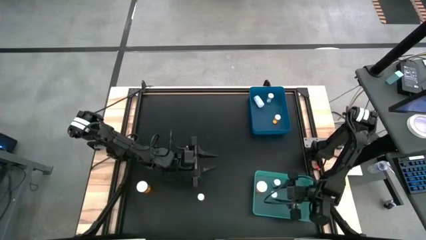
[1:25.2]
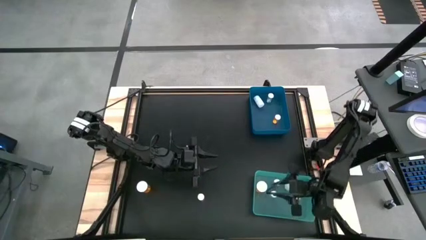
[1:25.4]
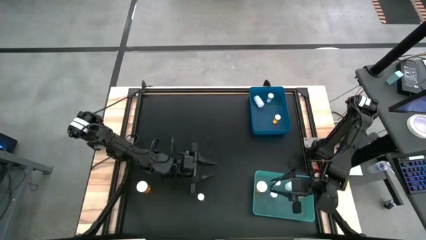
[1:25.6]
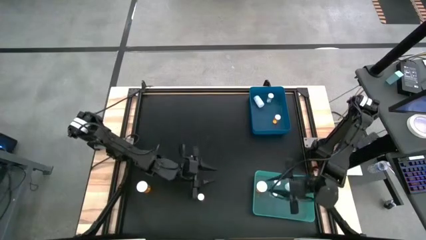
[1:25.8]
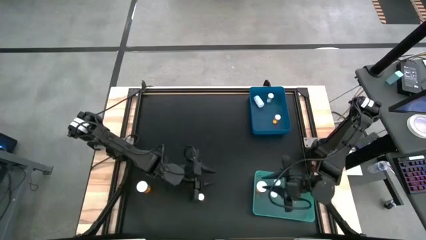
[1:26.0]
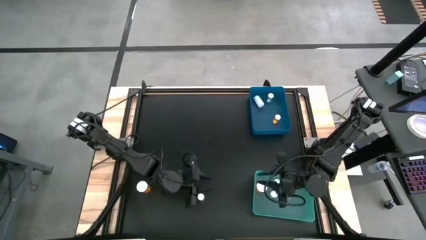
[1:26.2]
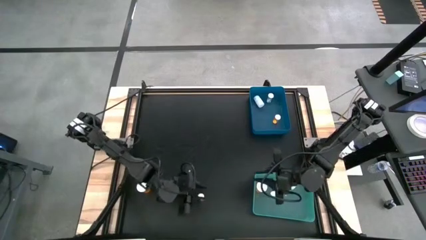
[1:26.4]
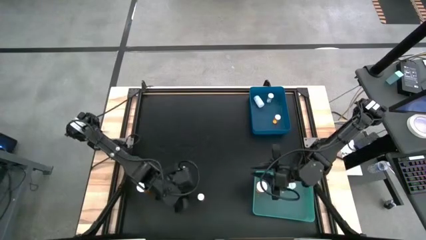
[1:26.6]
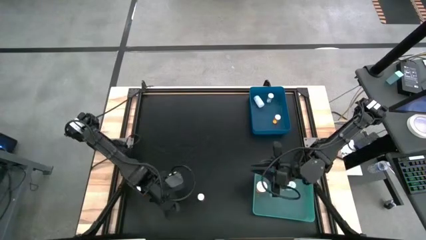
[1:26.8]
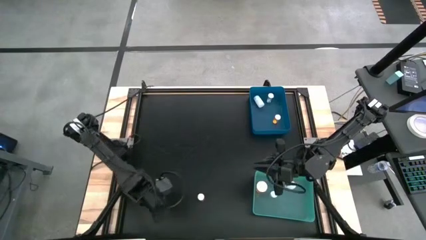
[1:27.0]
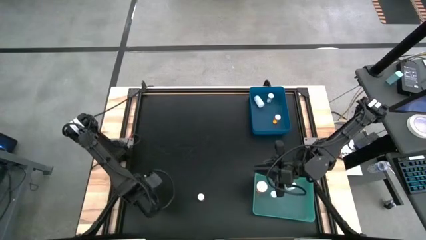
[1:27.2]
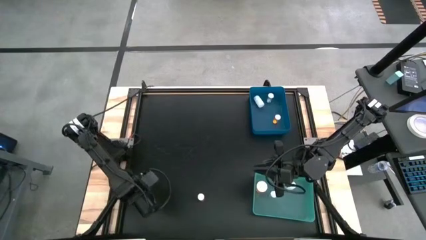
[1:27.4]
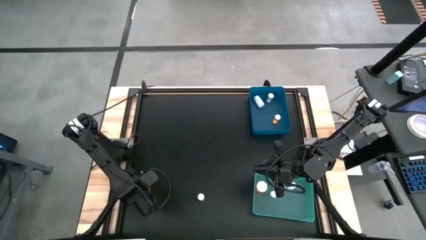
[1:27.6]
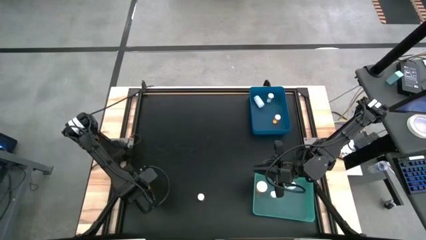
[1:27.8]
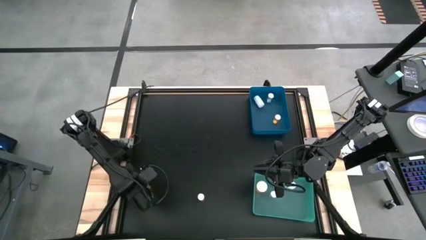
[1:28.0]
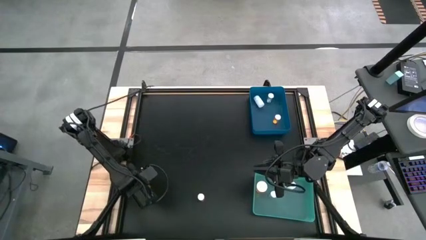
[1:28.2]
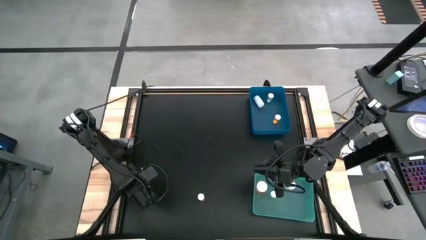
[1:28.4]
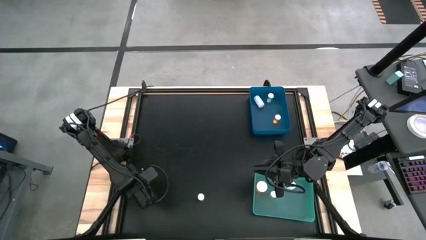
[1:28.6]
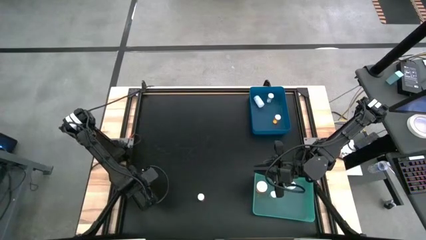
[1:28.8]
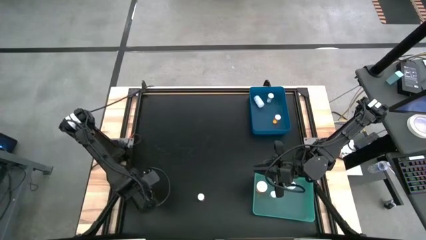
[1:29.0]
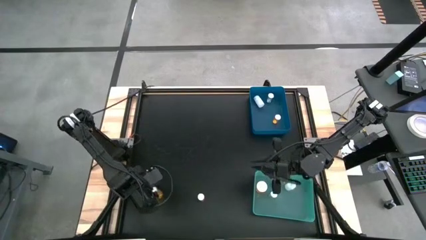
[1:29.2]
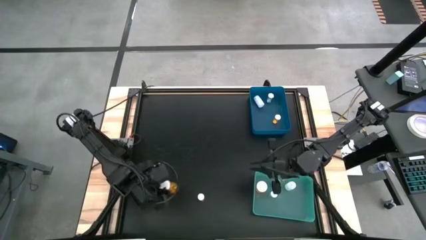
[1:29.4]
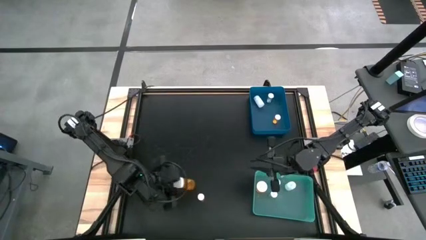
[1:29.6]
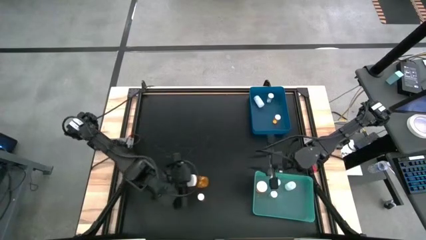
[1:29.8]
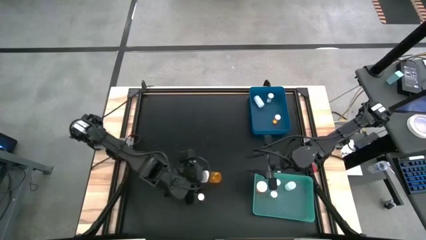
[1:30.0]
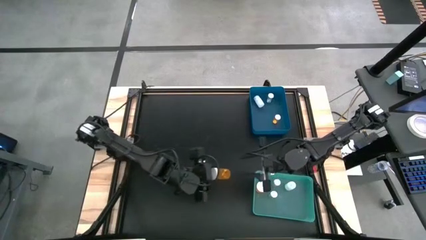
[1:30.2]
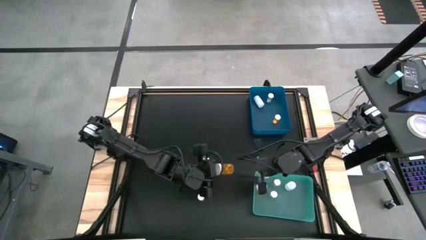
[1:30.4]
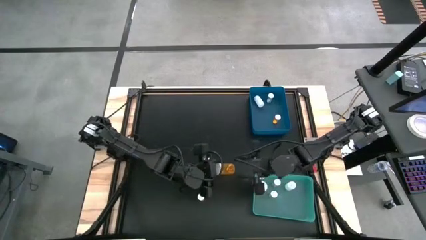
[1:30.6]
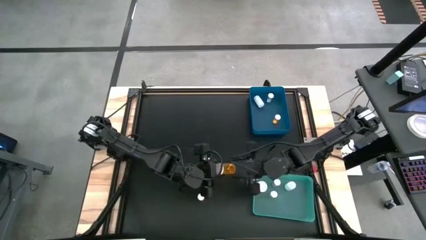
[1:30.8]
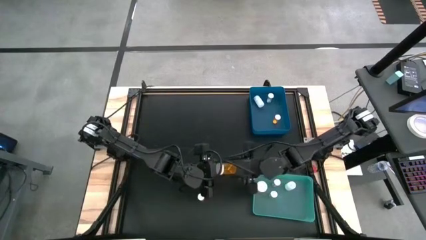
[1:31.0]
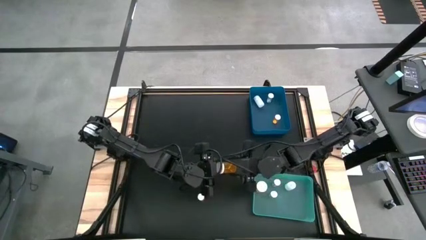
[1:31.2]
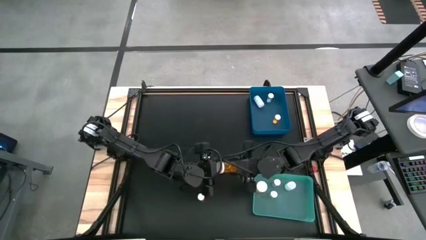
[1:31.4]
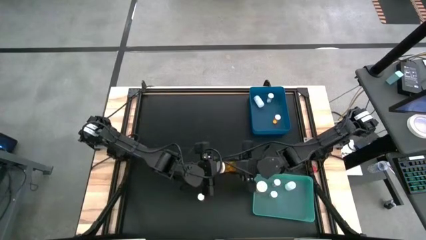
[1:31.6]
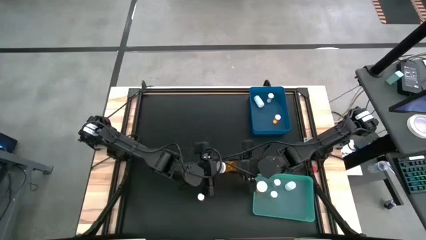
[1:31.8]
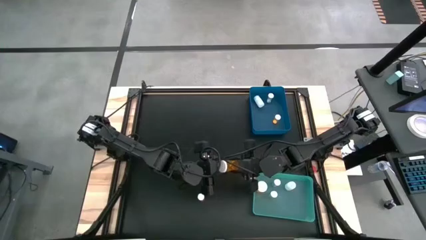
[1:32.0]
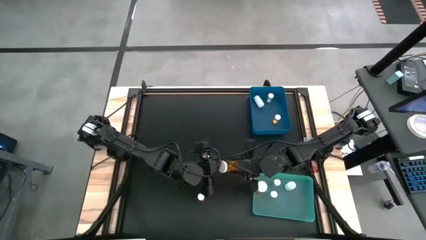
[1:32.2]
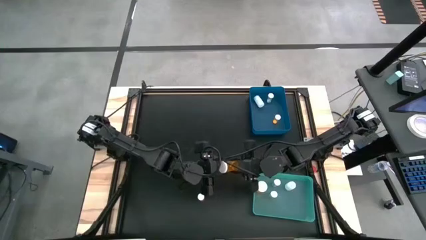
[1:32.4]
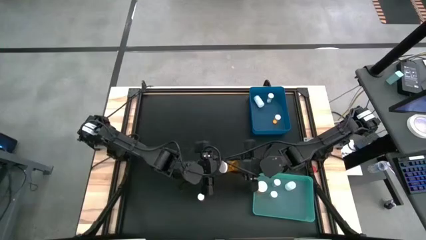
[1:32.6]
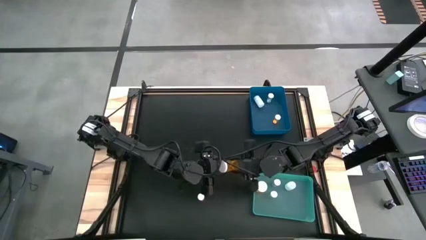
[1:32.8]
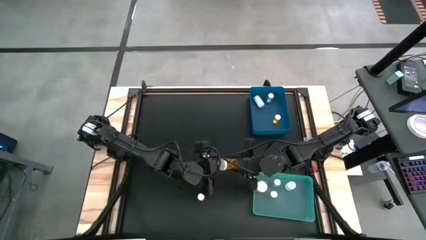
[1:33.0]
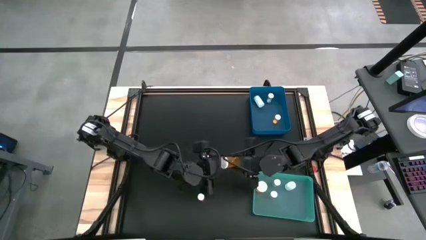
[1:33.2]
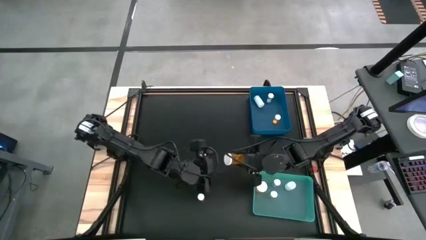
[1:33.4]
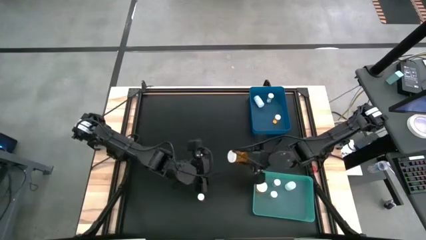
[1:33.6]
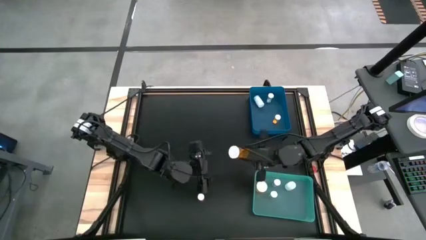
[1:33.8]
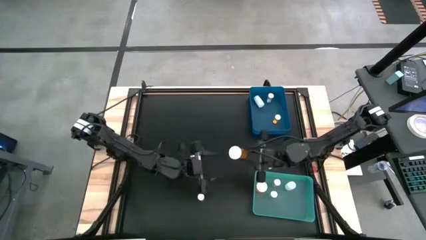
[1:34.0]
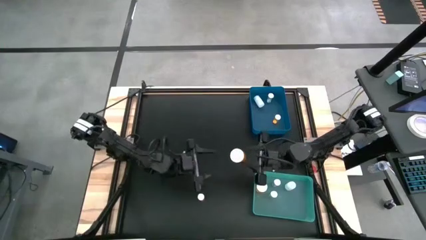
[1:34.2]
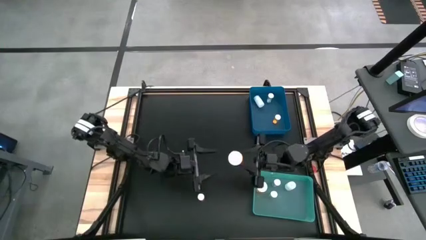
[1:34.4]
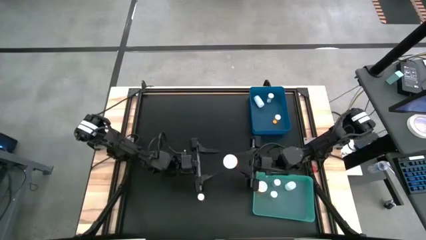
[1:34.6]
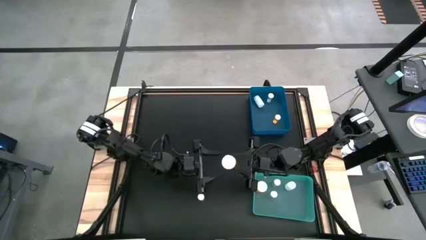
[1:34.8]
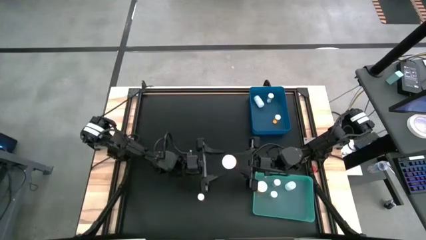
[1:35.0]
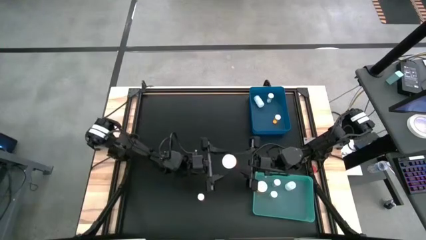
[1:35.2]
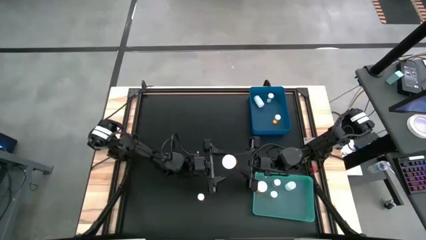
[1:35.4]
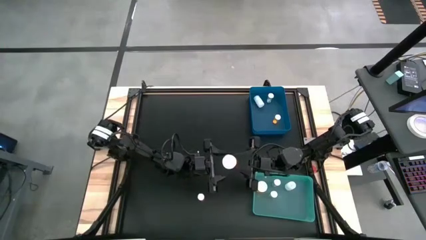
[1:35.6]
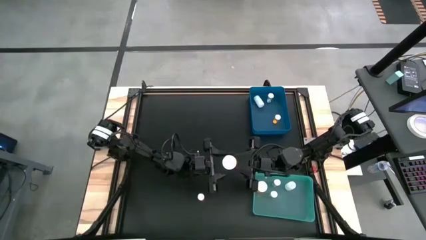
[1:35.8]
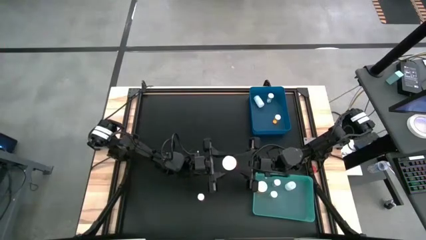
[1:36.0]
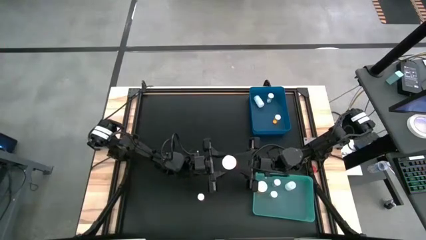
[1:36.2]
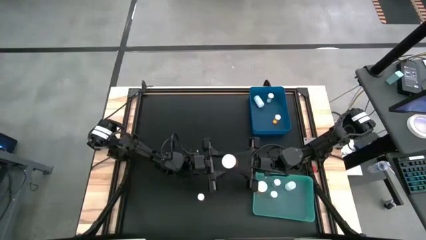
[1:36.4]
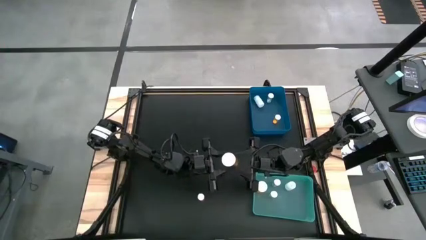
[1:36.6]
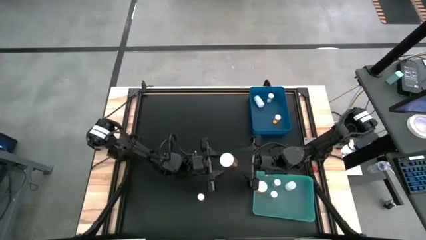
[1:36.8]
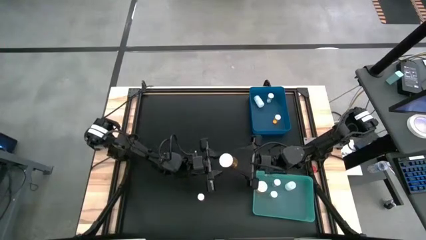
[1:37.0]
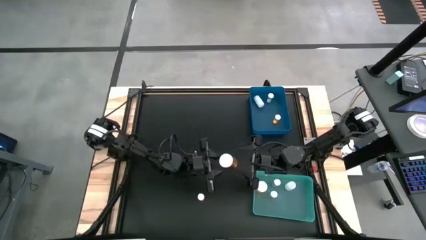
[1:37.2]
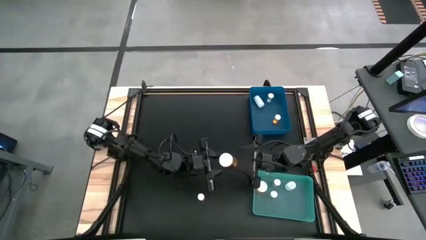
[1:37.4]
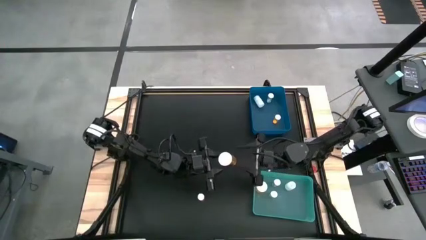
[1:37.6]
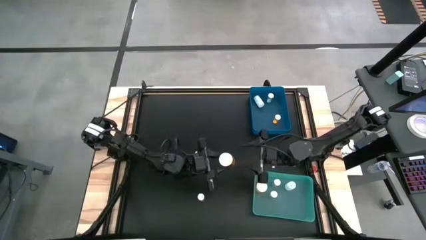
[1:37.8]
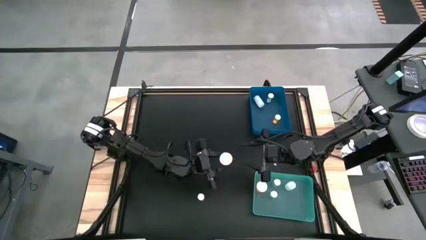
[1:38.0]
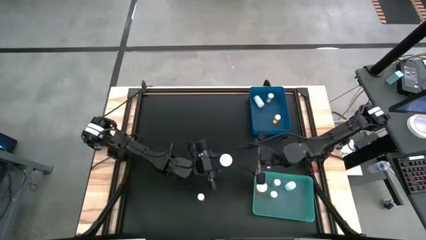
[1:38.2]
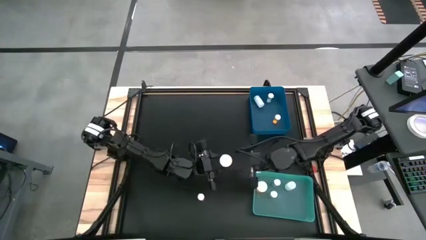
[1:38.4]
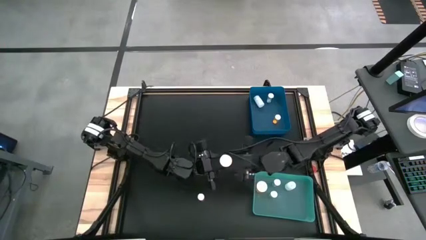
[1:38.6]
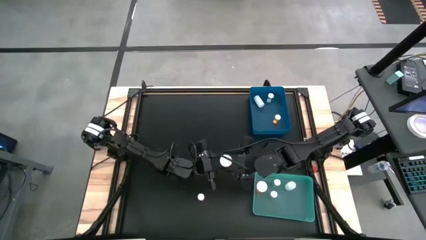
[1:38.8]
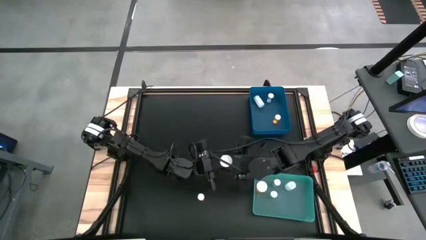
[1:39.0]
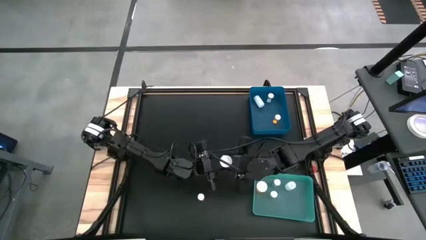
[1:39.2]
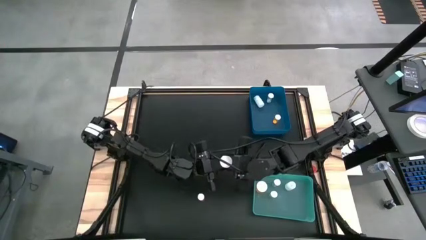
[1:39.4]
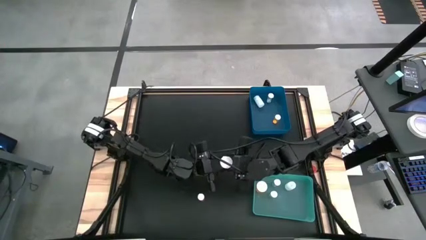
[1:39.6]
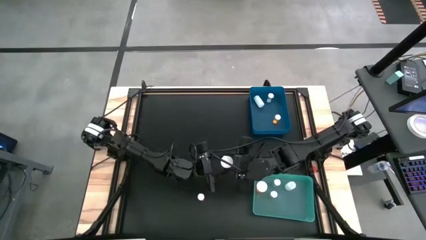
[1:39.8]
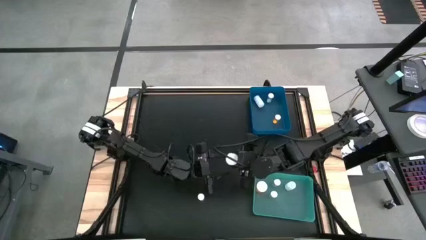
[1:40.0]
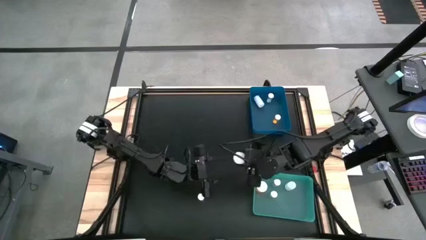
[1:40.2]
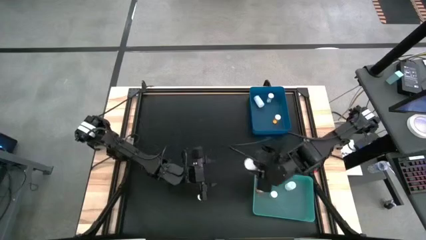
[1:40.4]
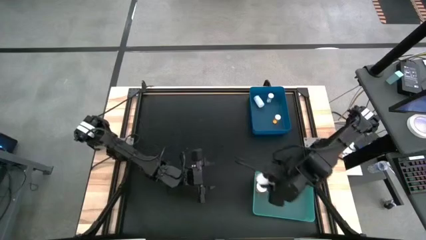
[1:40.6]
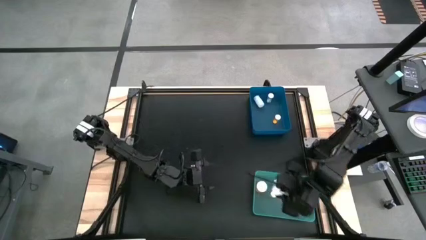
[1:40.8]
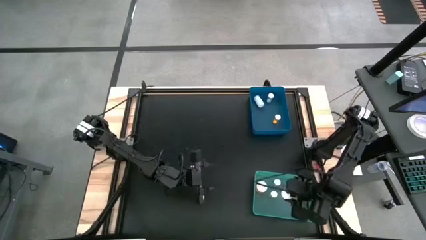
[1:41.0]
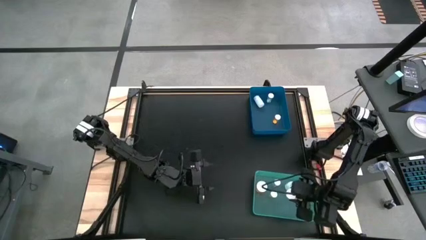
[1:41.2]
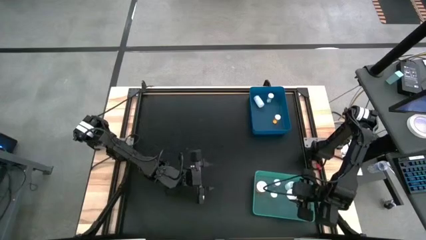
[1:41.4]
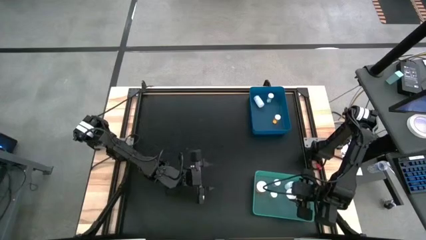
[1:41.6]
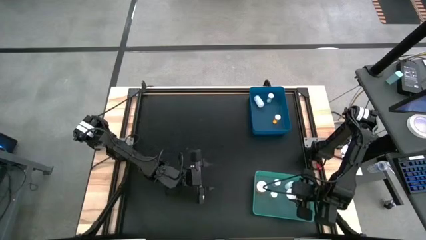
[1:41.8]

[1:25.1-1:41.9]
Task: Pick and place medicine bottles into bin by pill shape (circle, oval)
Put the orange pill bottle into the light green bin
